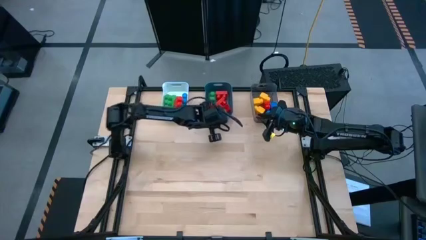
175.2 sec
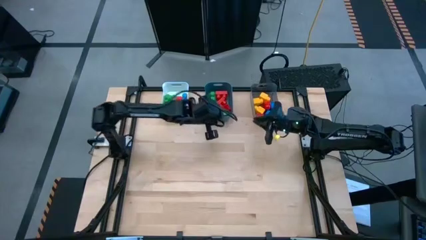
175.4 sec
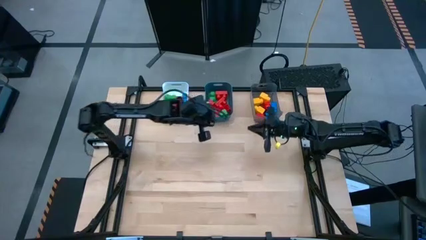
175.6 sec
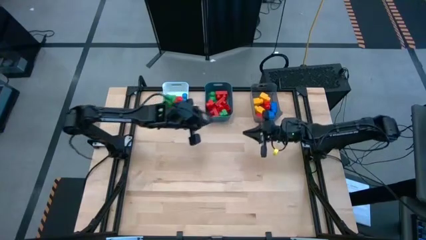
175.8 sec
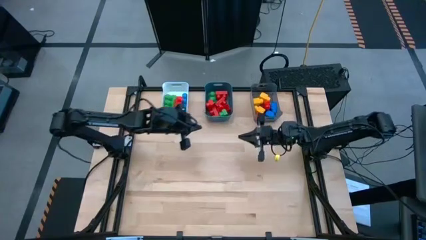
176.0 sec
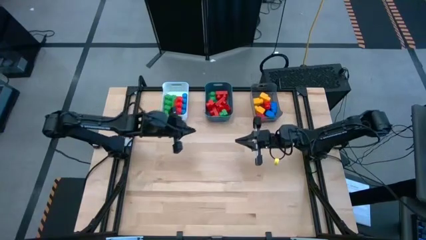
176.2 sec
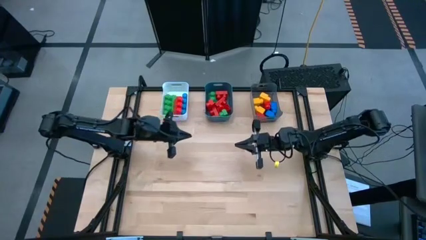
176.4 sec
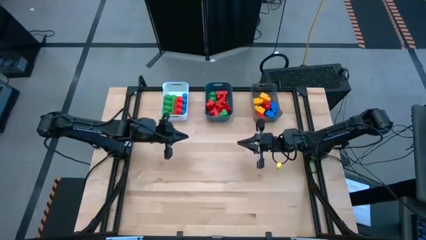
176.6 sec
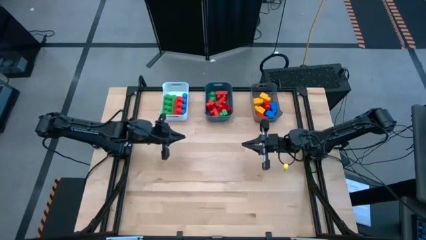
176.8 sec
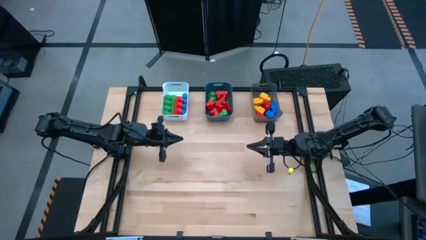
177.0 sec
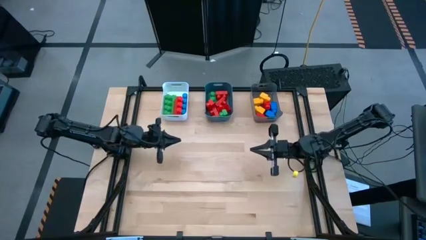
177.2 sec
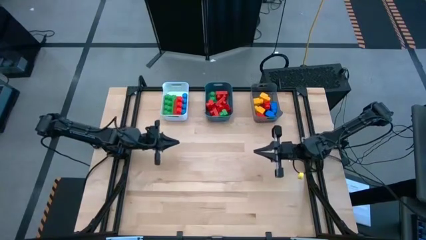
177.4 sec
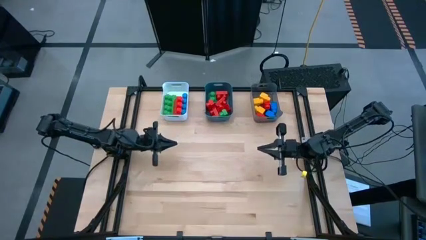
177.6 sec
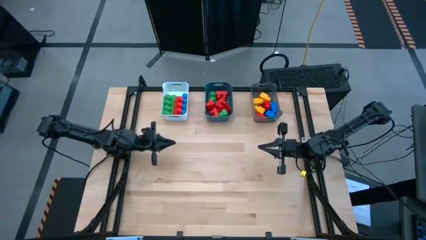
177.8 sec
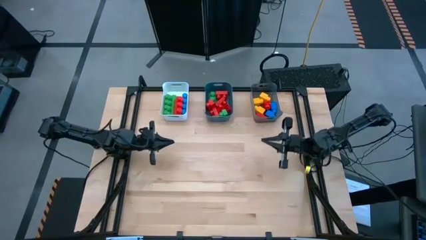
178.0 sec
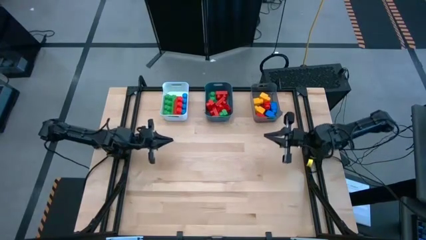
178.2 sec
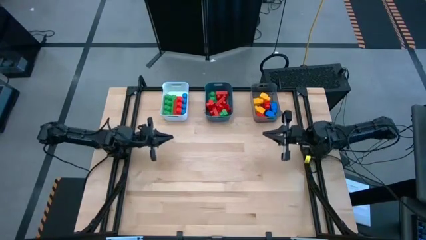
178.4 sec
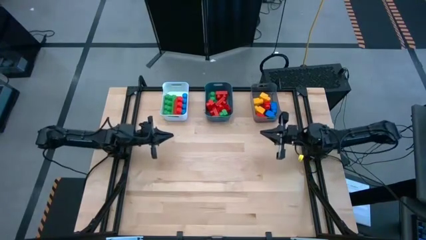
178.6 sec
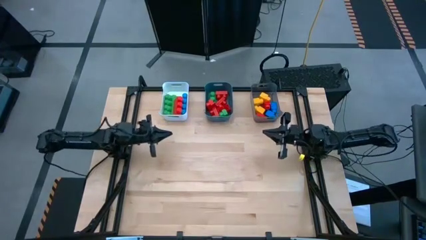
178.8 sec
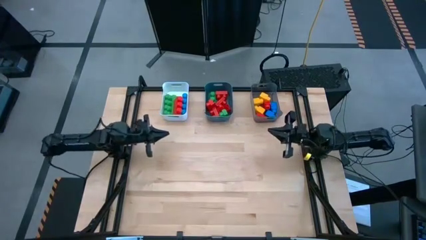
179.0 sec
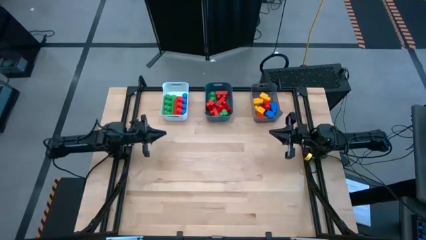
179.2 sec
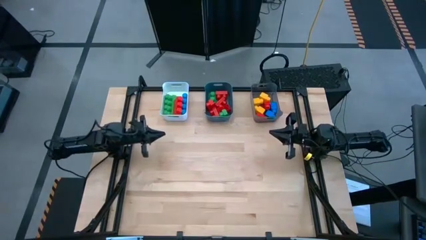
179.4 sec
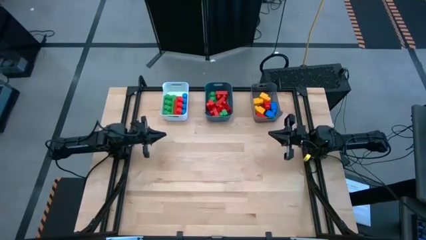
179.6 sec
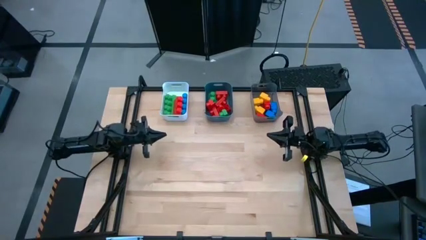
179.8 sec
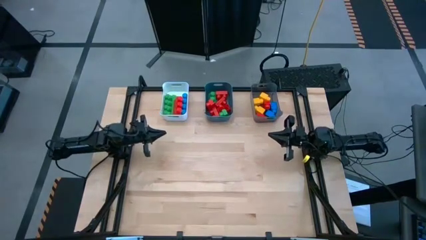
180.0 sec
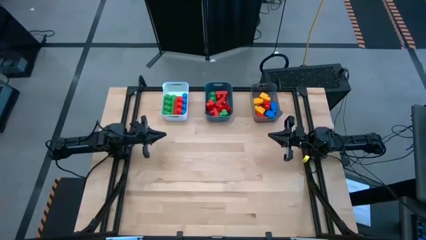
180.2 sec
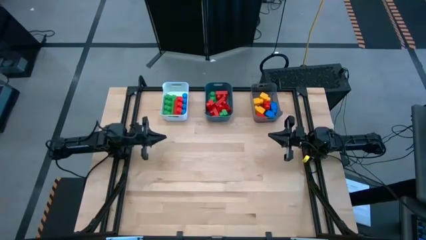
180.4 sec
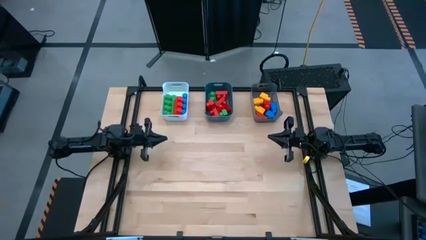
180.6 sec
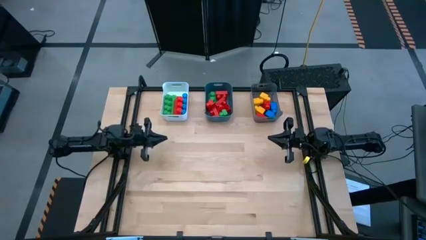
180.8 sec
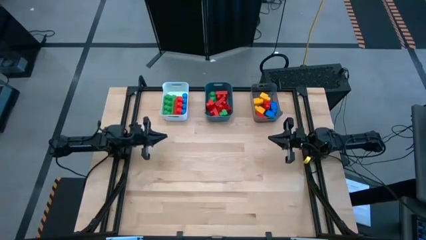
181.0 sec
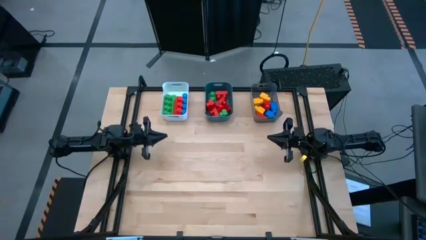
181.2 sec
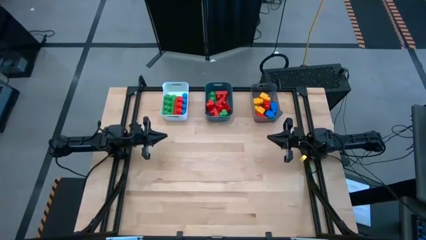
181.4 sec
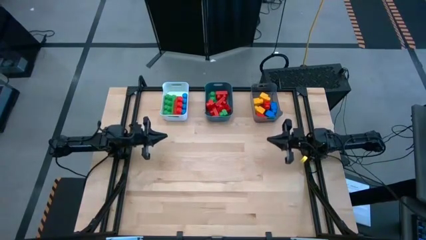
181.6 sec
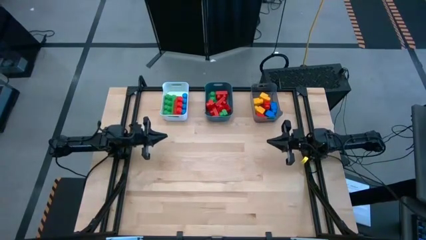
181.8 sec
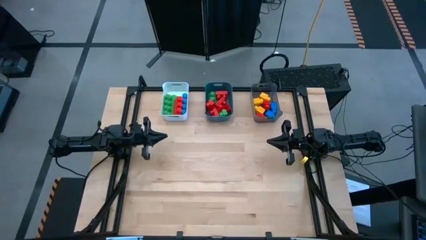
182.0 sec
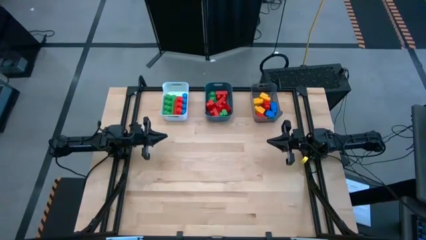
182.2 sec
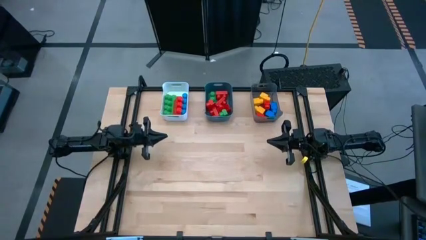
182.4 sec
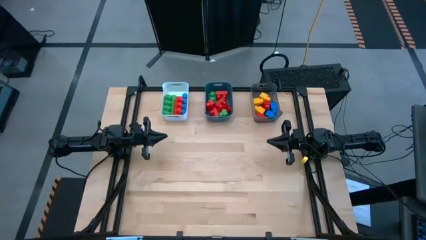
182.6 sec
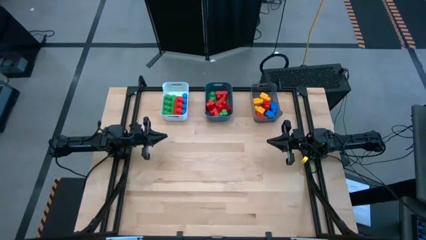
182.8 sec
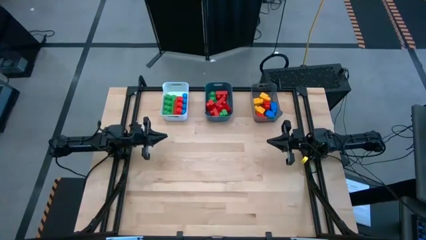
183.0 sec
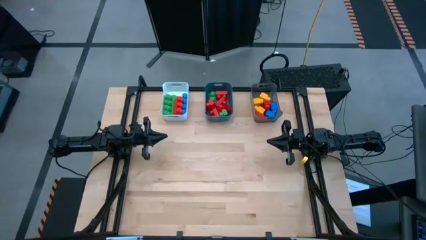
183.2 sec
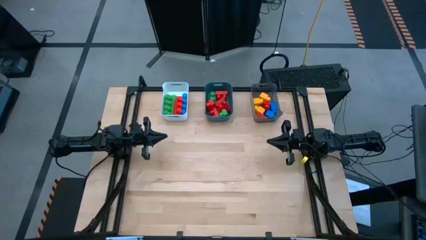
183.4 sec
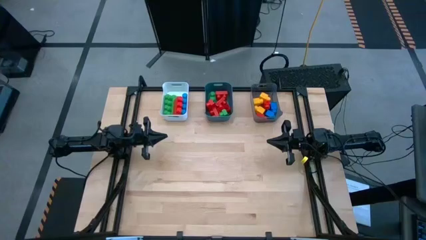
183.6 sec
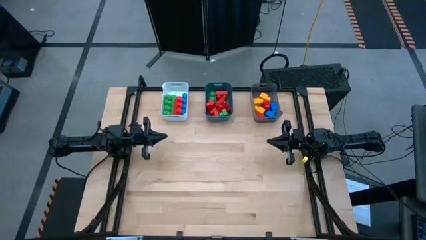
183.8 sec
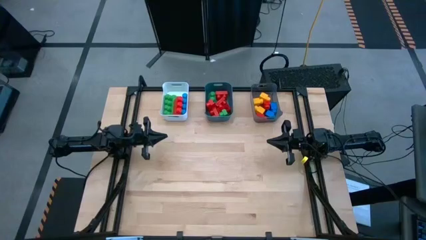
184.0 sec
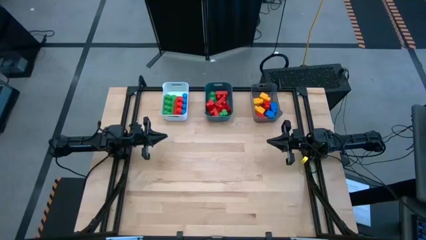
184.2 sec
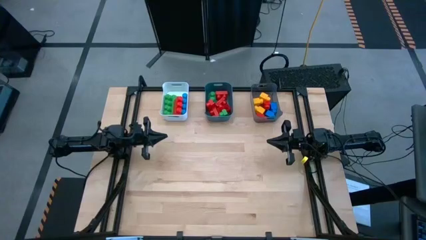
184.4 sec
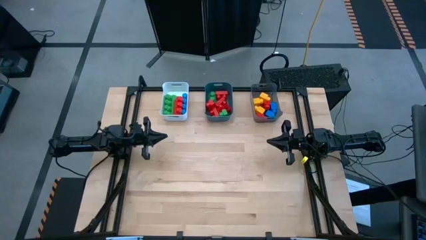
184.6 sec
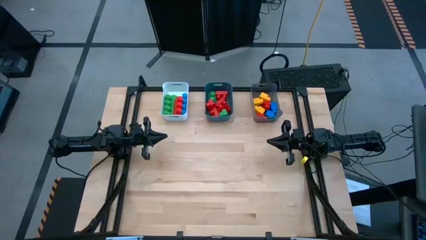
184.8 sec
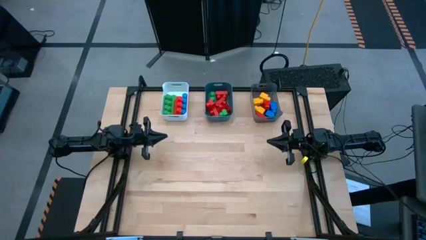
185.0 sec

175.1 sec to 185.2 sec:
Task: Sort blocks by size
Return to Home Position

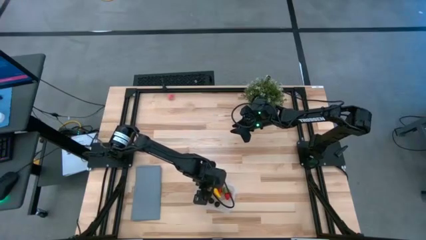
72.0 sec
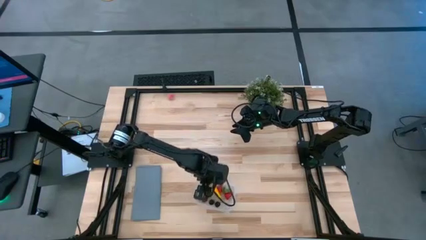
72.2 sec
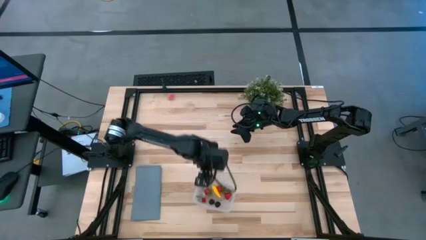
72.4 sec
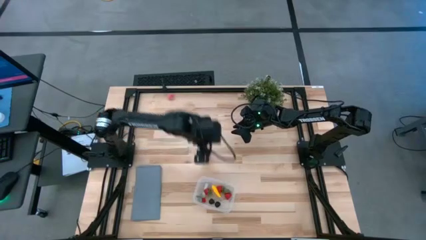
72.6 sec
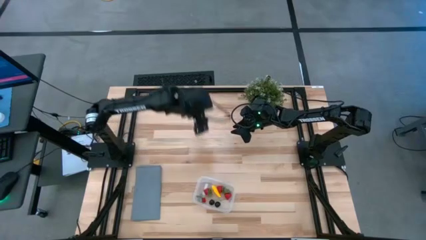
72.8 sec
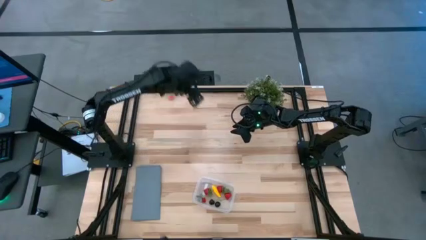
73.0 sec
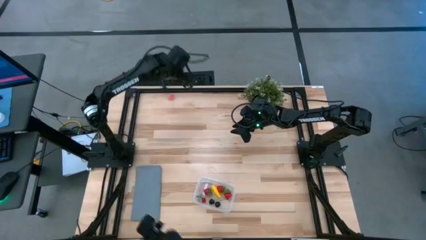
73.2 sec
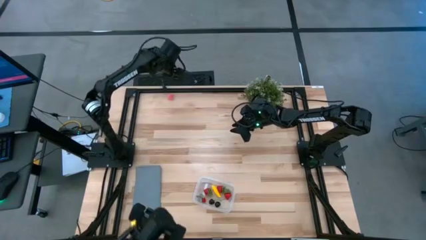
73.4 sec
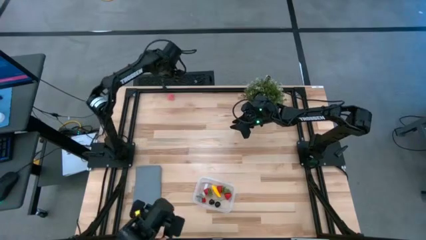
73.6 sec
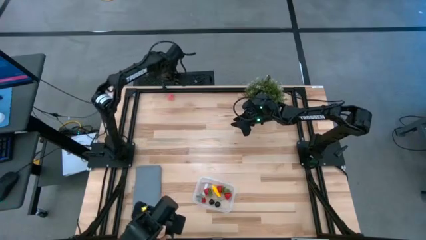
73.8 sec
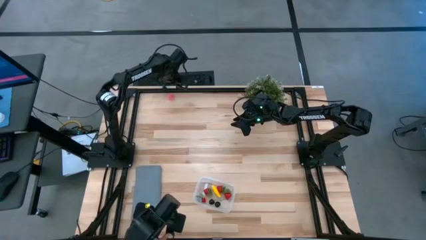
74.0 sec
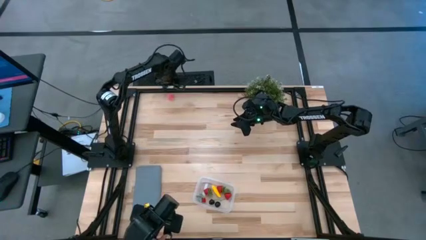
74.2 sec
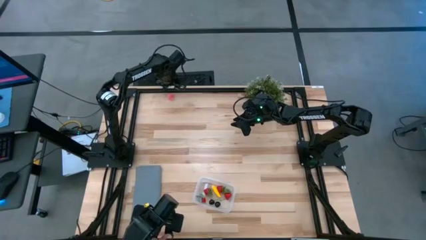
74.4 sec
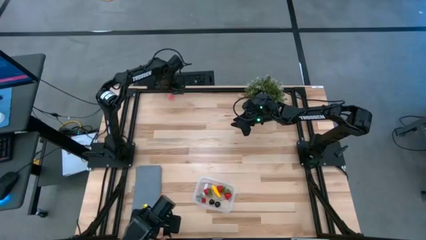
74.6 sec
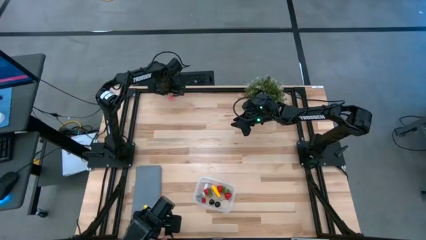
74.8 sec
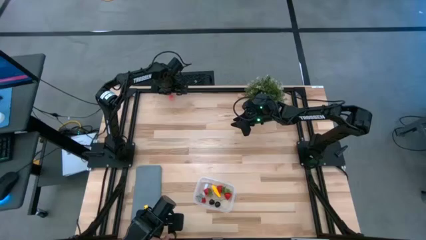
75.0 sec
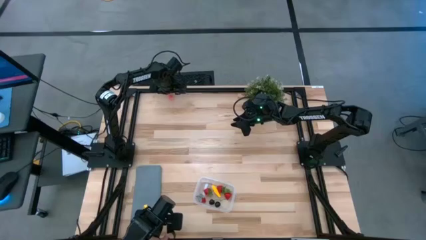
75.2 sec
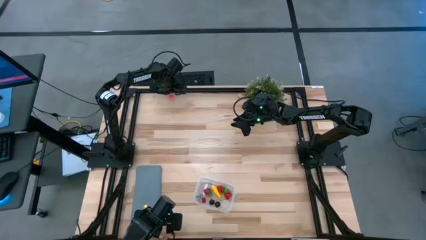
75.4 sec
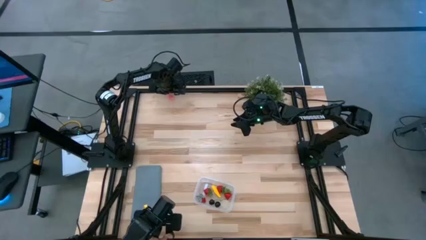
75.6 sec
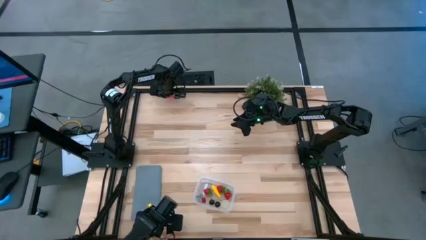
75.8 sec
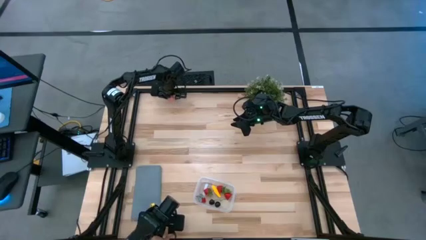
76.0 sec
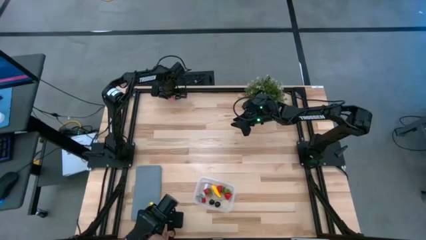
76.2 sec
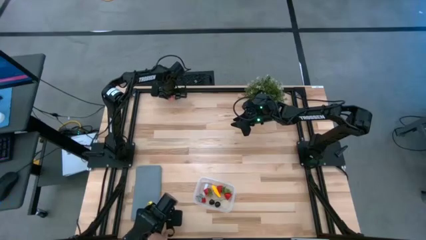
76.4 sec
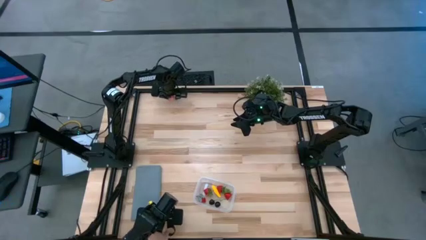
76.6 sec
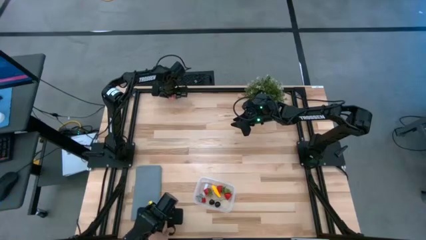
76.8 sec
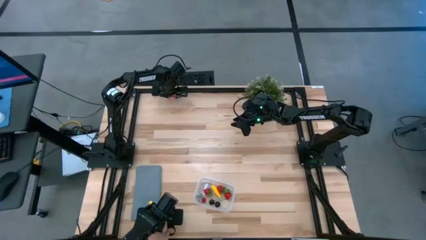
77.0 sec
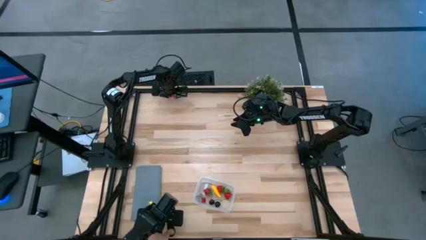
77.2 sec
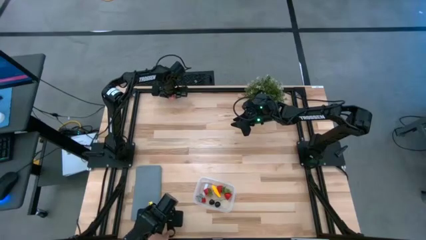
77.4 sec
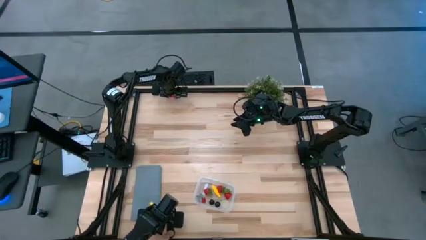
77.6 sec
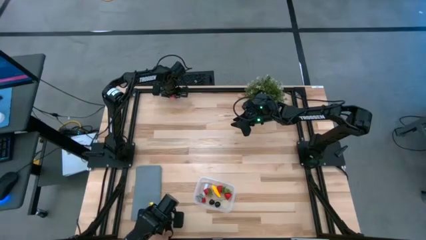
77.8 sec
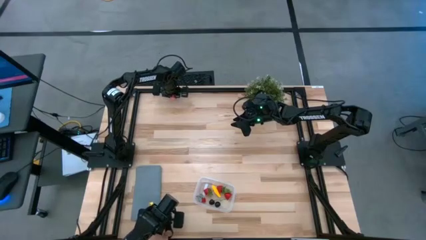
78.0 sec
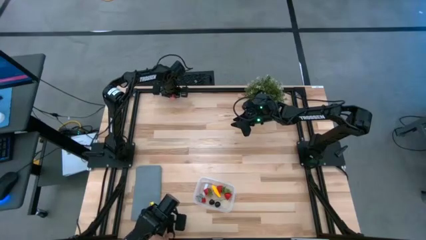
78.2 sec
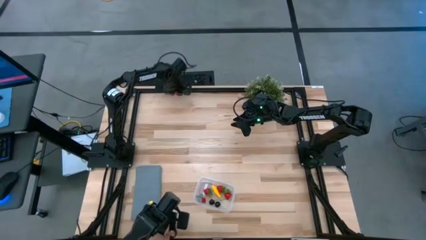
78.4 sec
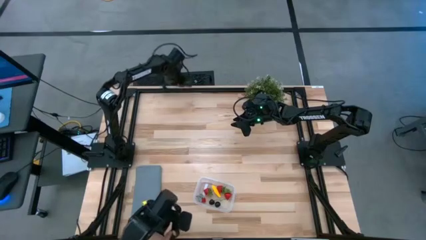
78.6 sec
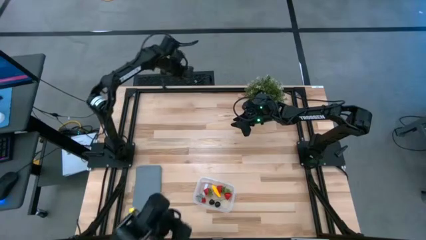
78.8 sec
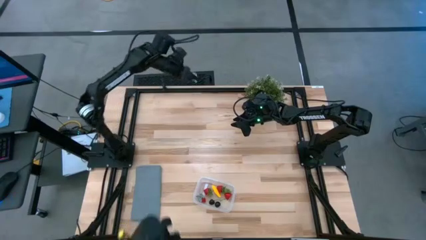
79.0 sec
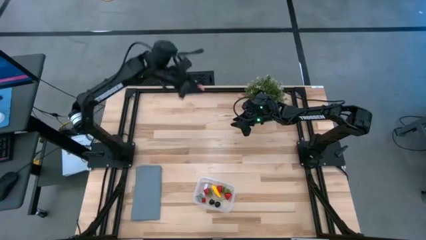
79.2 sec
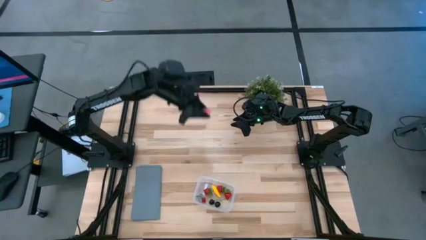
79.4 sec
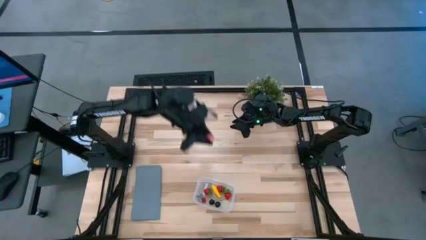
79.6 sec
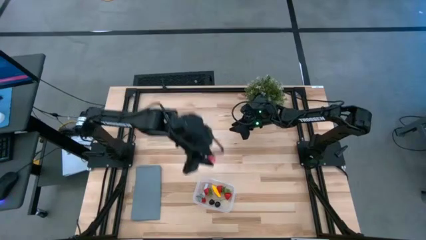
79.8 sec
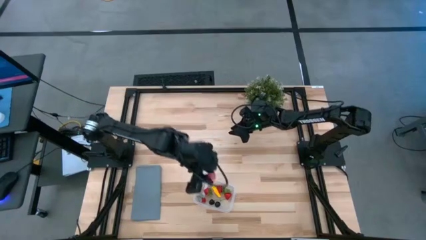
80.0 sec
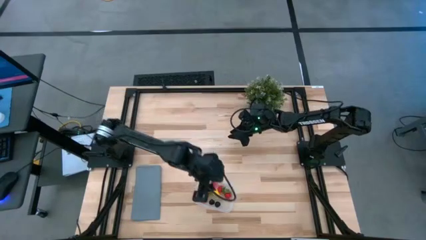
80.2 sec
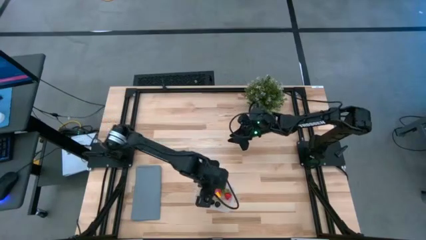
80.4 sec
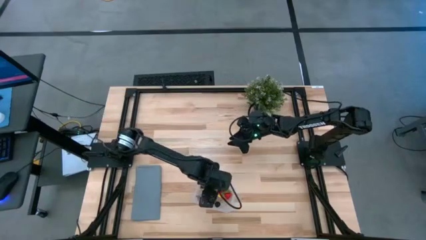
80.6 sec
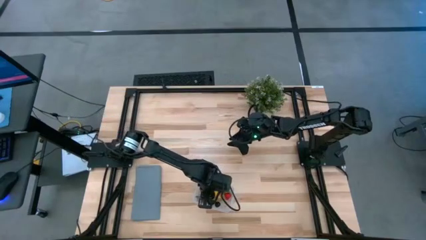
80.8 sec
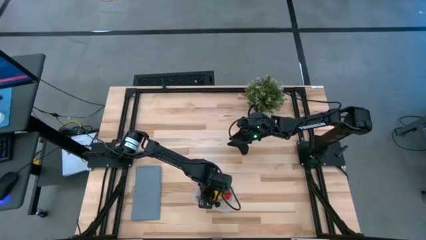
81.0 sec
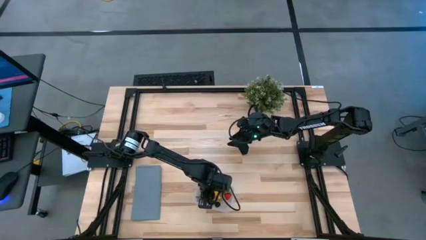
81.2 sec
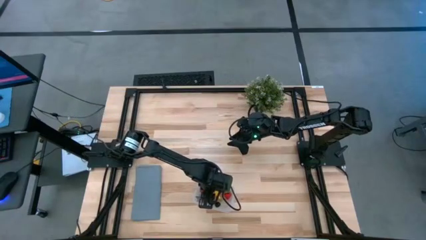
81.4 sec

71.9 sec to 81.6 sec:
Task: Pick and placing Produce into tupperware
Put the peach into the transparent bin
